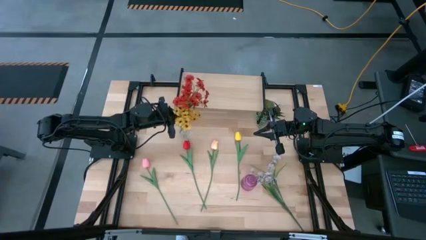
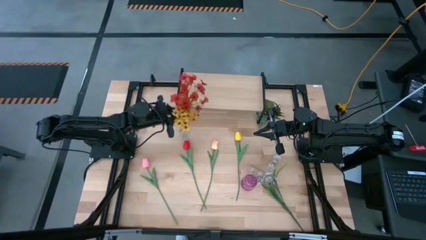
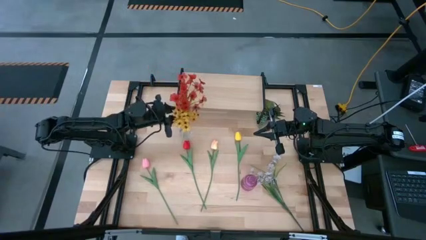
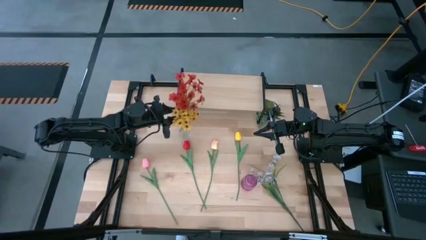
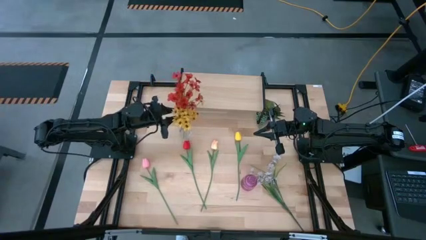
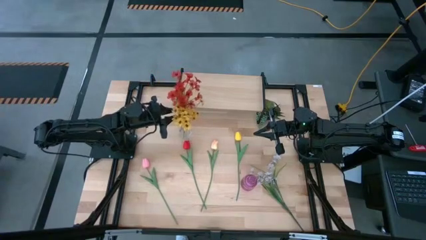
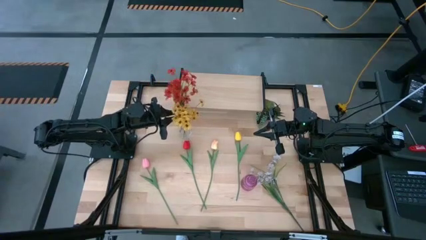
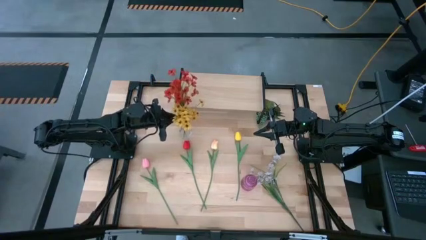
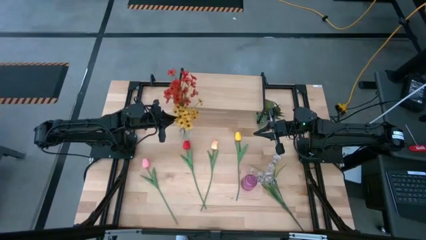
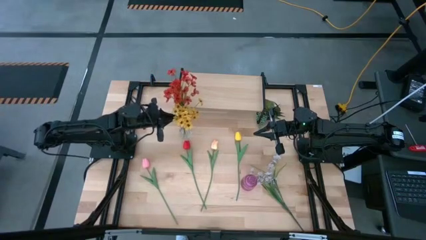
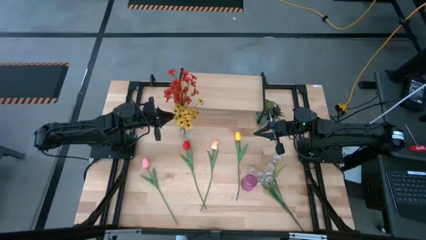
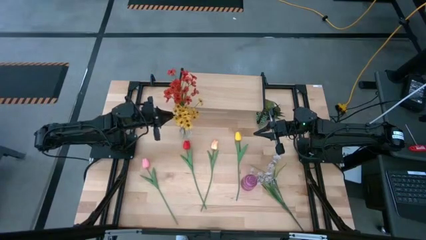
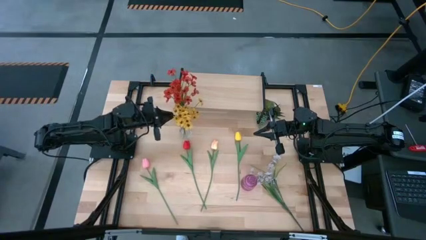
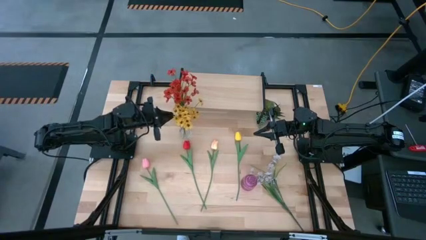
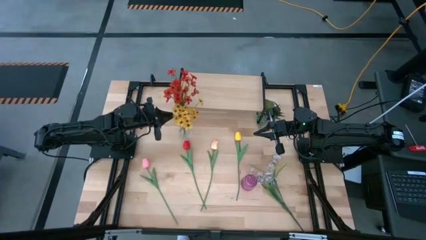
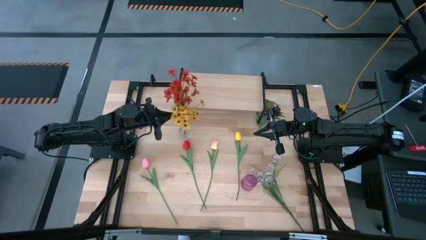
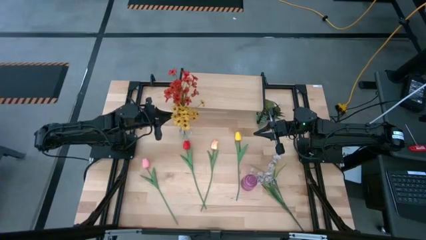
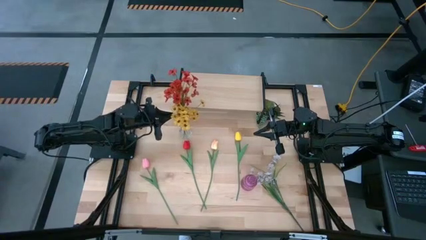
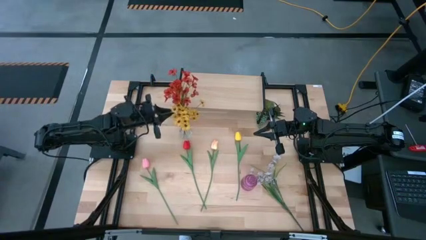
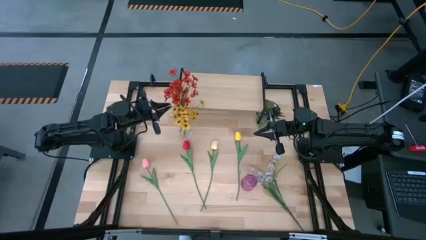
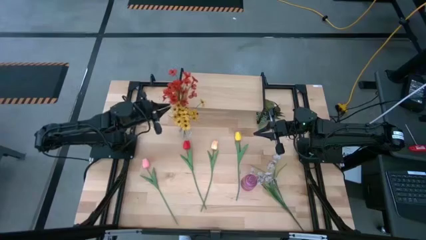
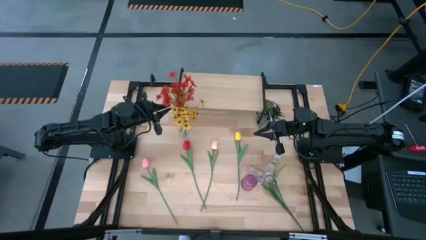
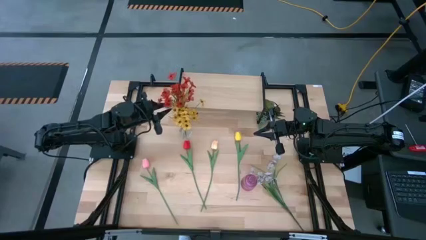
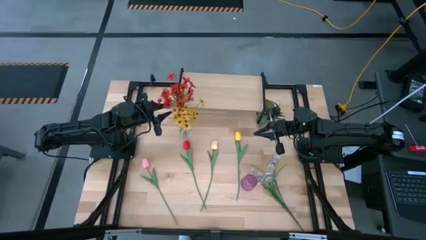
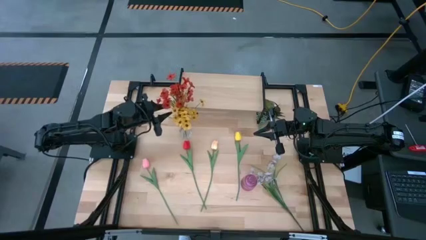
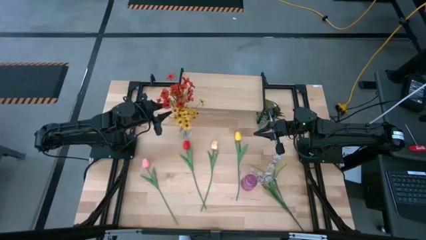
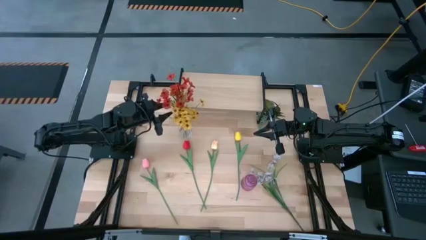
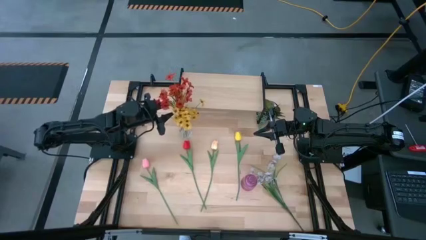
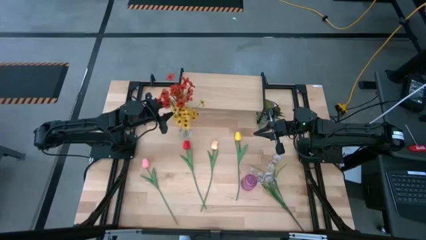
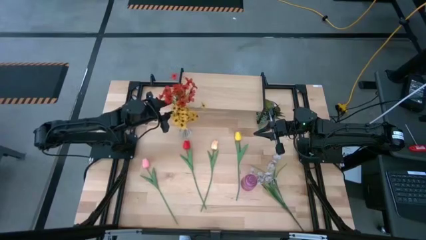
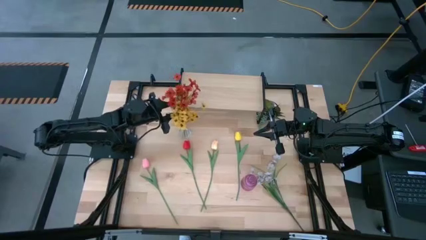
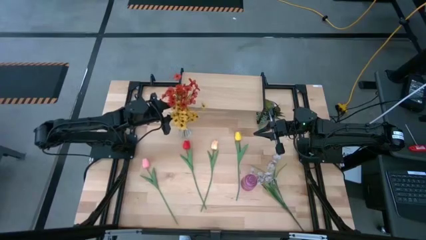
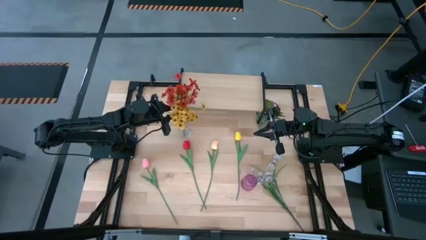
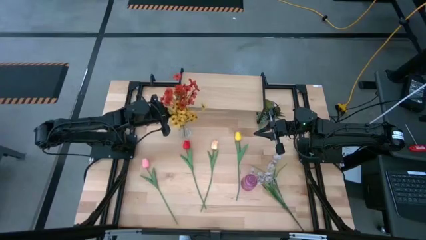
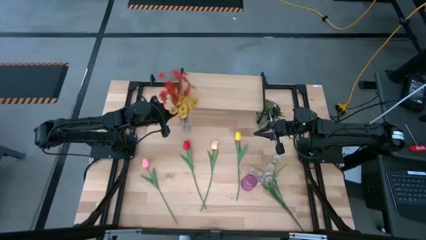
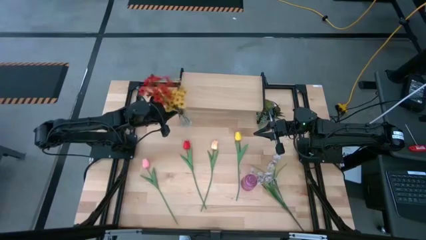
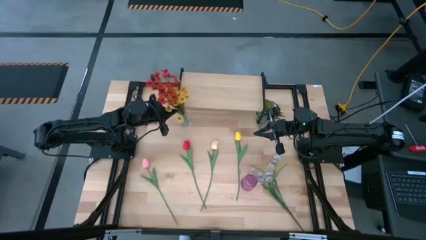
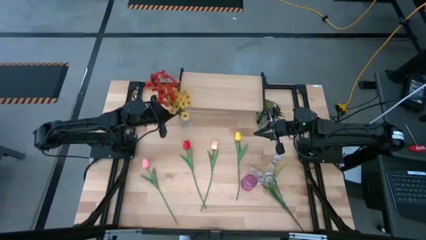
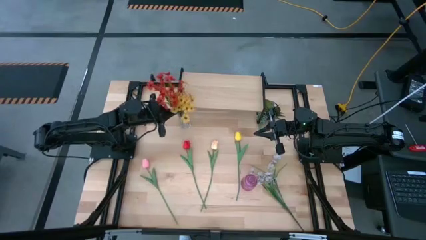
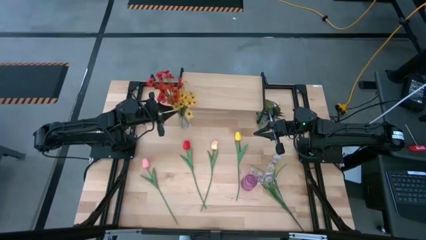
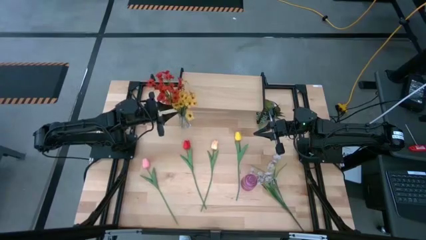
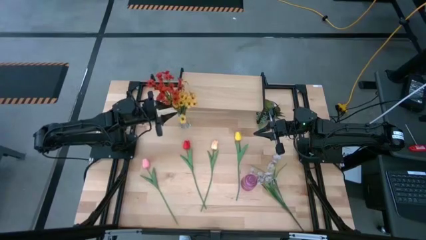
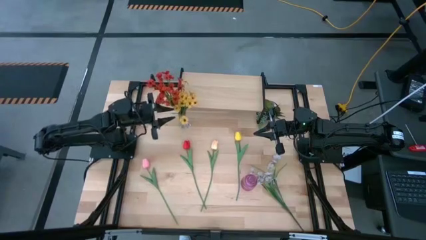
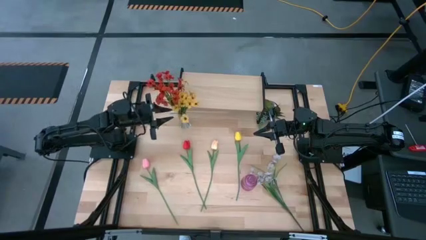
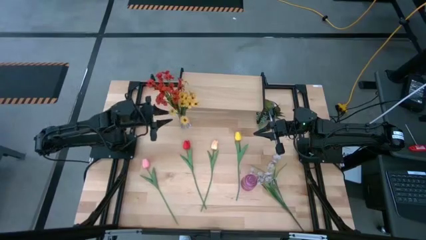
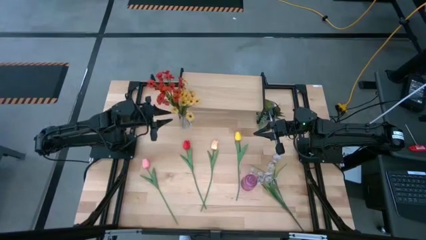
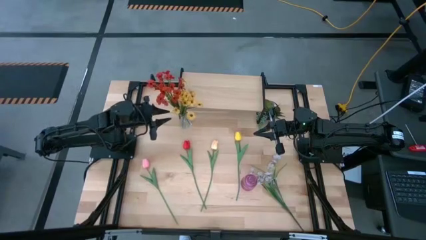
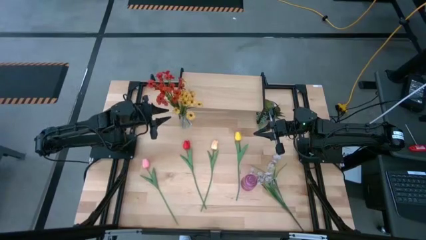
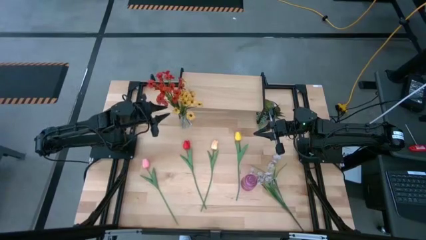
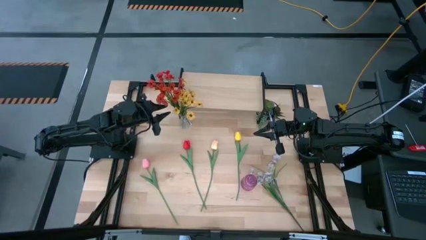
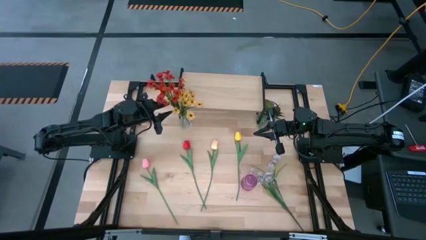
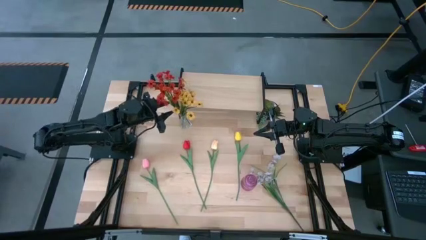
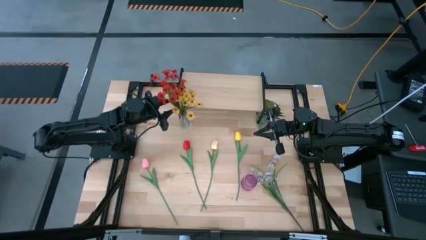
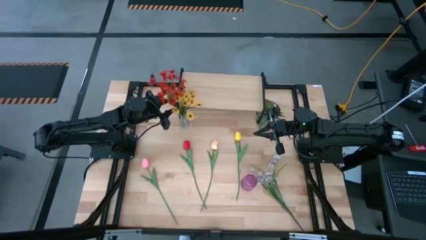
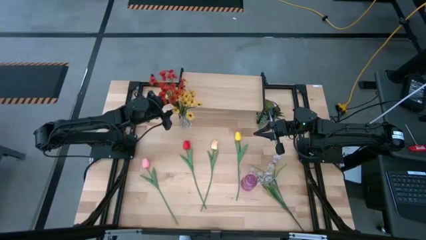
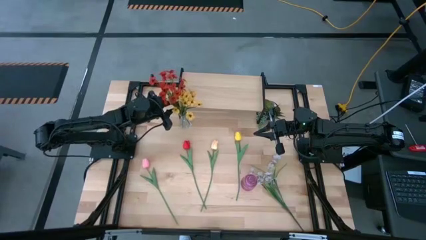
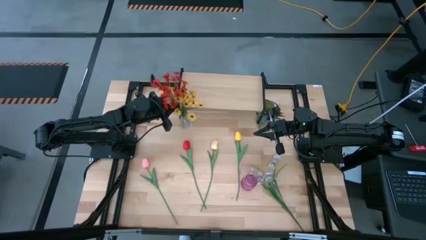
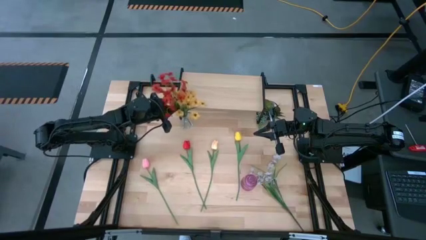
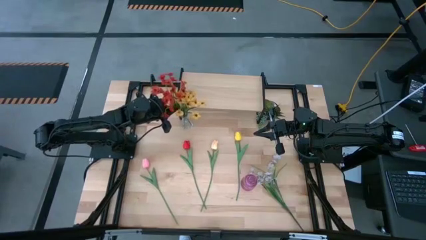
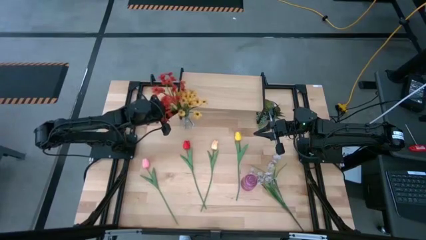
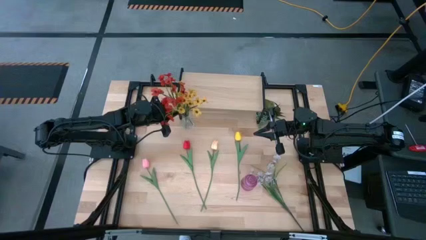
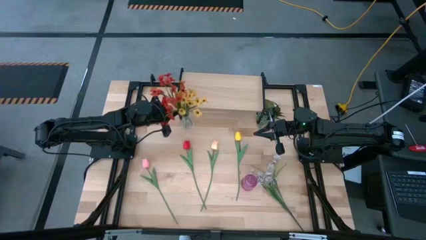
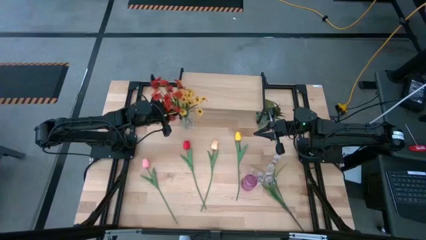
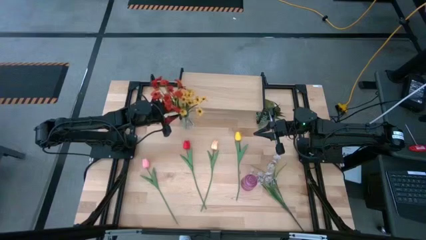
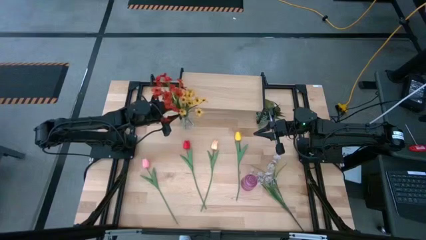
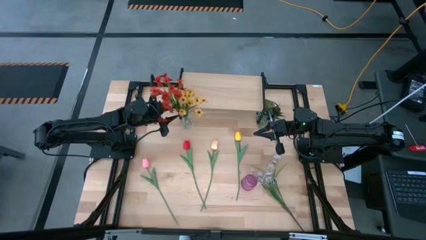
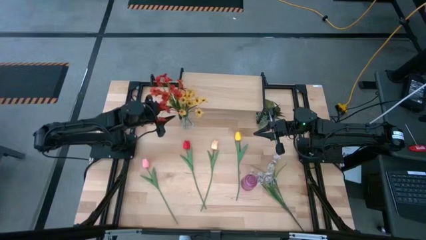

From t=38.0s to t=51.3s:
Task: Pick and place flowers into a vace then onto a shelf
Put the red flowers into the transparent vase
